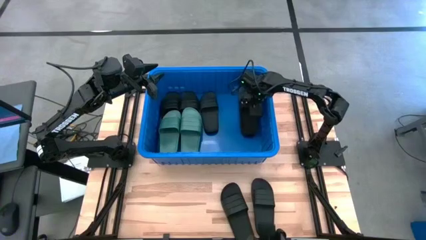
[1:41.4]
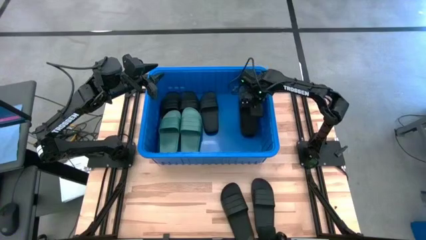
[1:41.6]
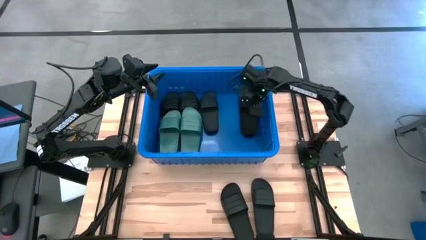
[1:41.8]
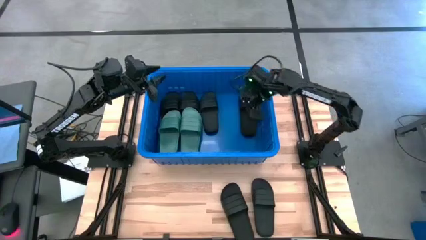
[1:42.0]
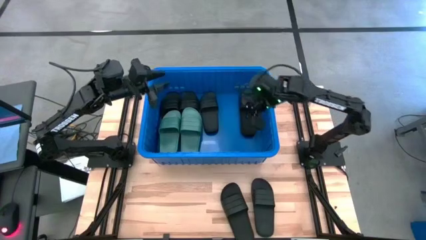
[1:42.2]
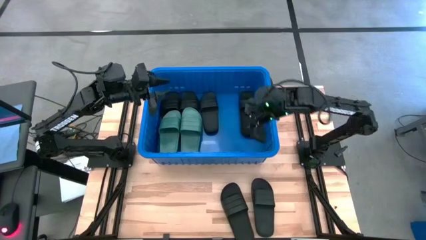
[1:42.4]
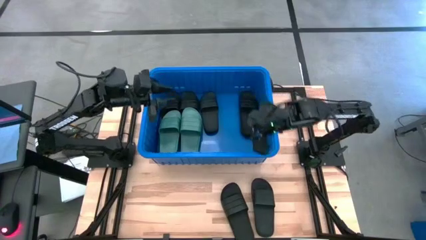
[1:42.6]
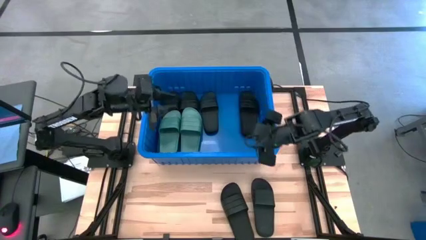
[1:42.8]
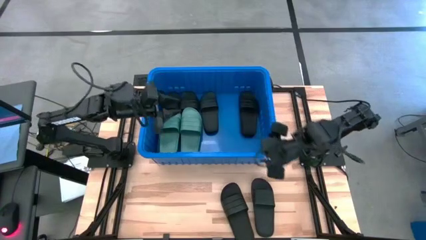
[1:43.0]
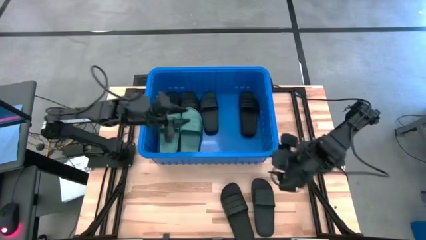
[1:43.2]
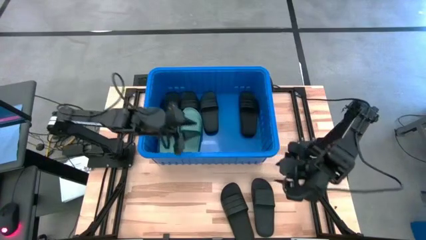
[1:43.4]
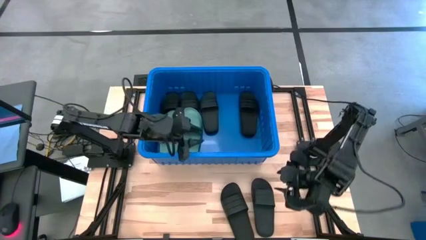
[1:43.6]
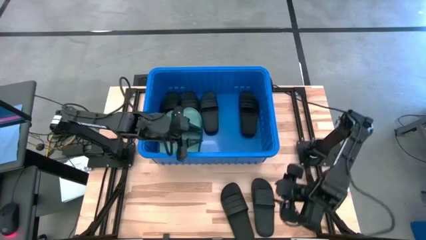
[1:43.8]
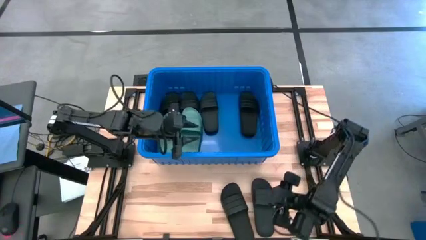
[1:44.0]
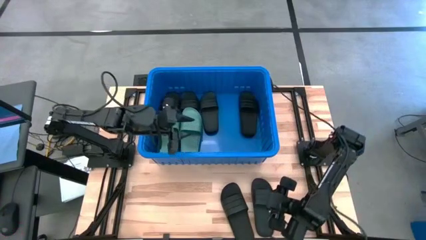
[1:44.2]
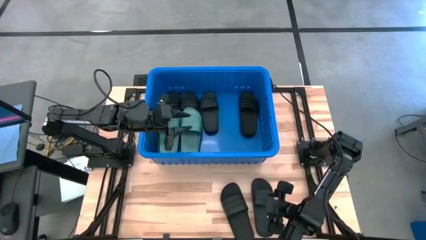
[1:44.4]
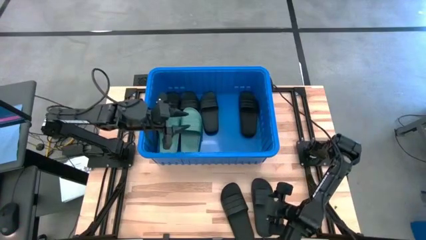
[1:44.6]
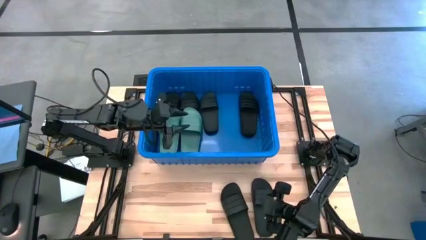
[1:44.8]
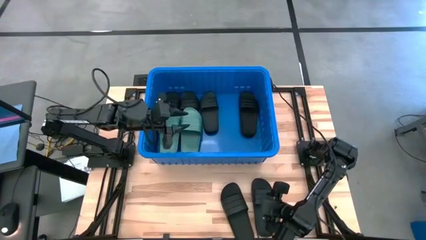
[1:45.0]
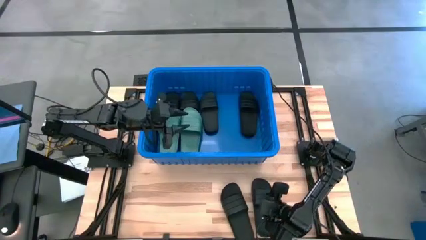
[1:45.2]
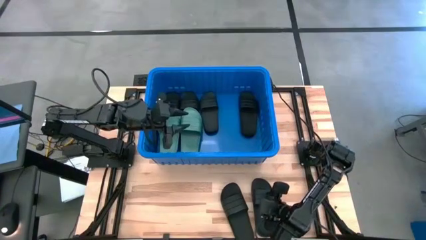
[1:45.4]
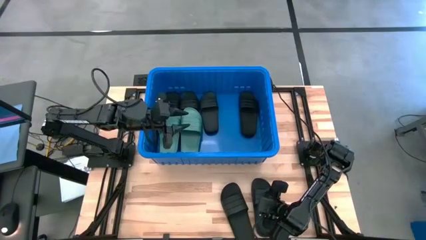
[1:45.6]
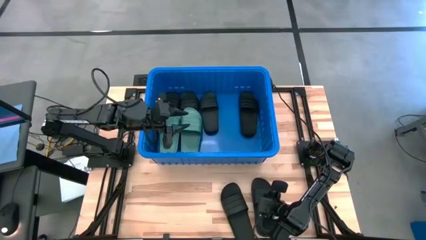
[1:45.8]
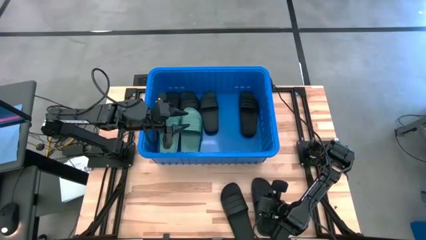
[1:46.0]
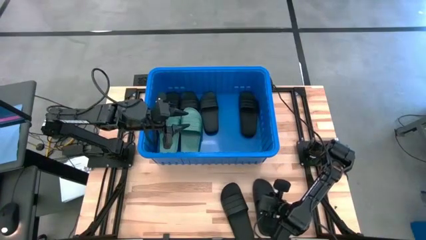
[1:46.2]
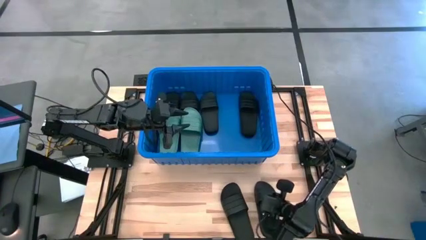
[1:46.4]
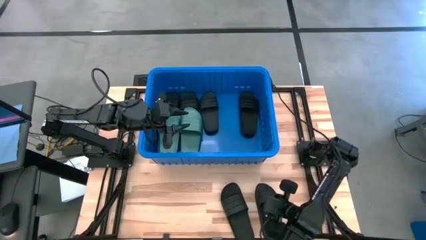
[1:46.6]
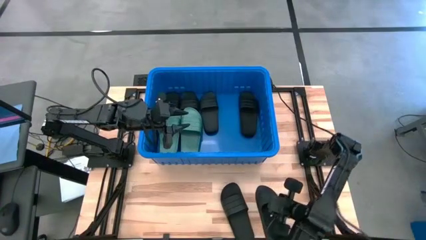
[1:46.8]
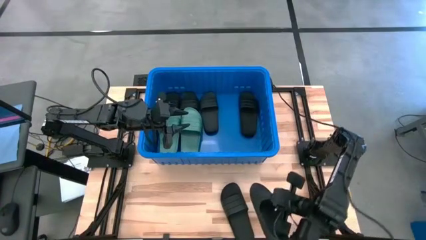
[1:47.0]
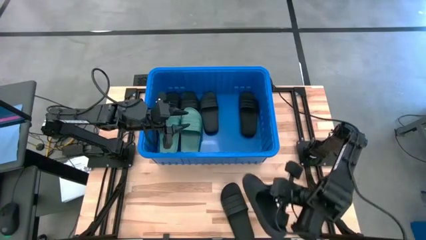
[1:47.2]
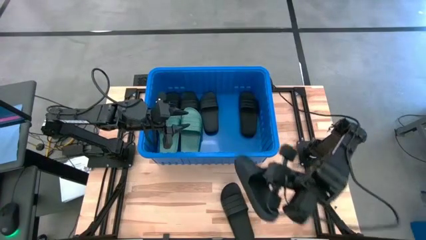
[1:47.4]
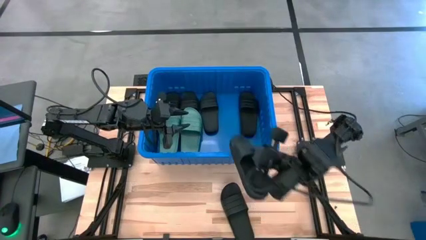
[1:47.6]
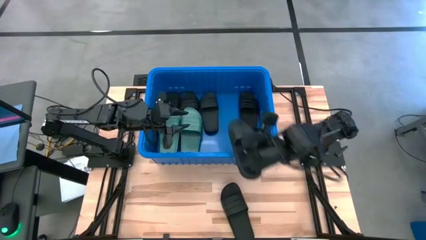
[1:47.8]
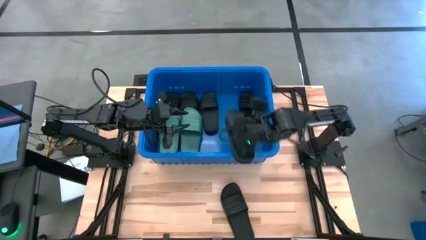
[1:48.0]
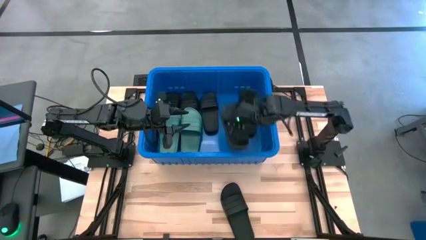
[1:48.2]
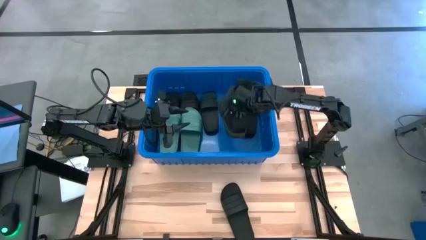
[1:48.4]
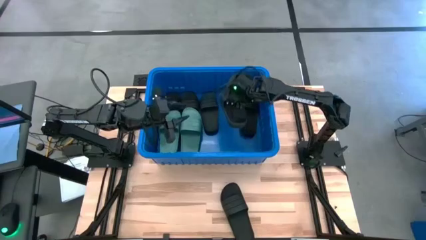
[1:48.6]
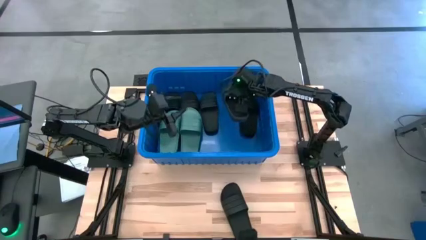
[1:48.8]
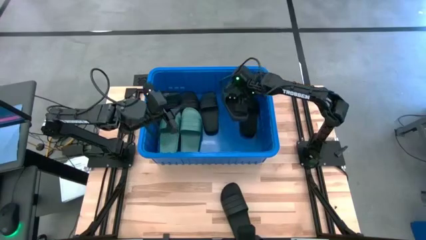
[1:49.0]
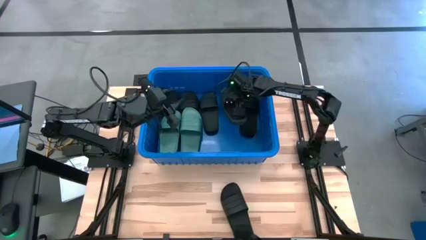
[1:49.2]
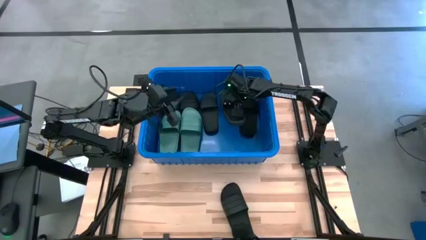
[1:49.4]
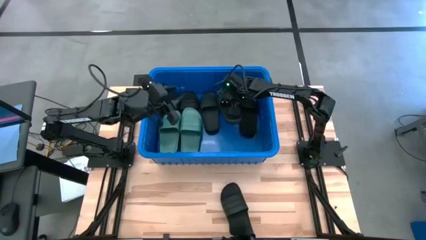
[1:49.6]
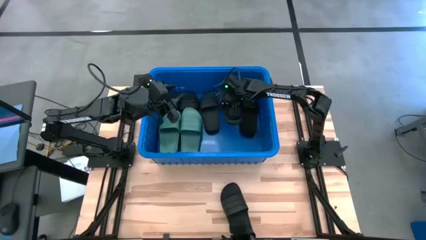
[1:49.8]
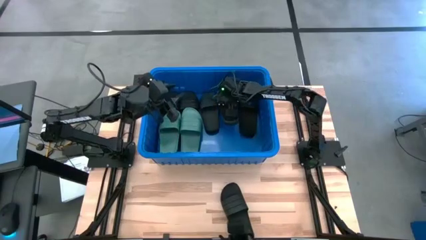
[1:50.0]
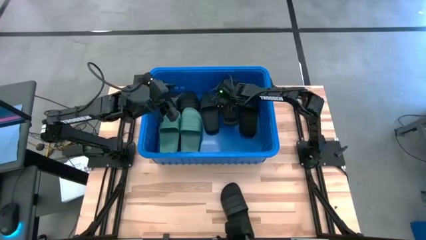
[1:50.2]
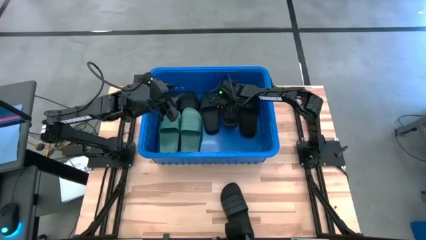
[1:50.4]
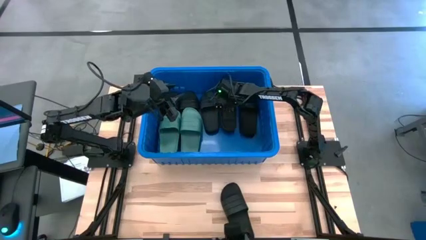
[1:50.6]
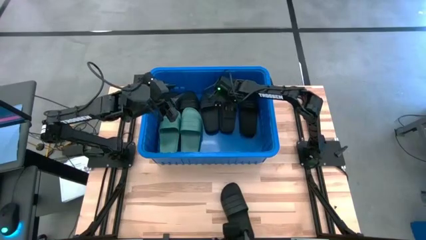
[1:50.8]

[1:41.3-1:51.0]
Task: Pick and place slides into bin
Put the black slide into the blue bin

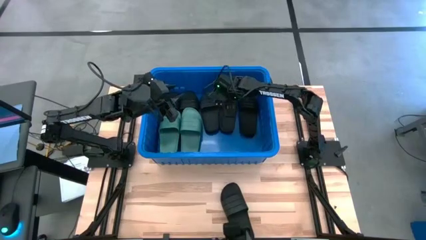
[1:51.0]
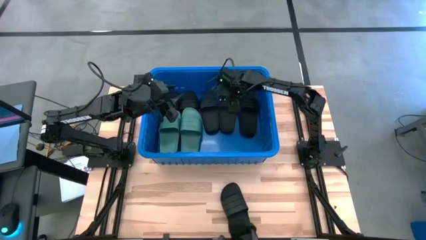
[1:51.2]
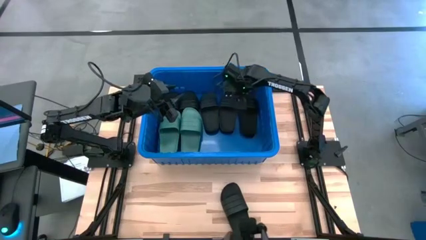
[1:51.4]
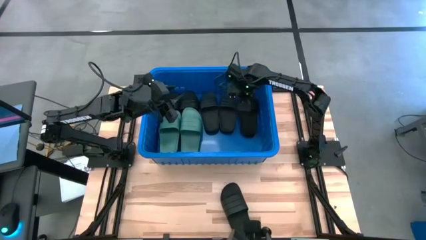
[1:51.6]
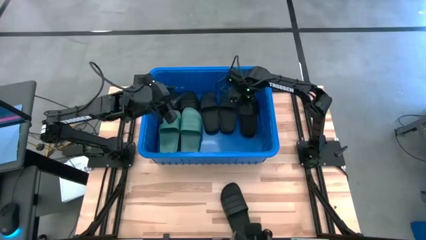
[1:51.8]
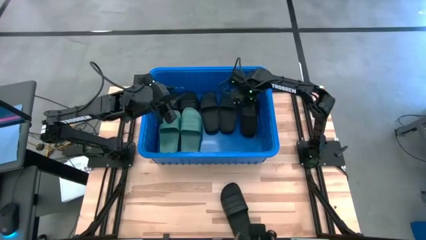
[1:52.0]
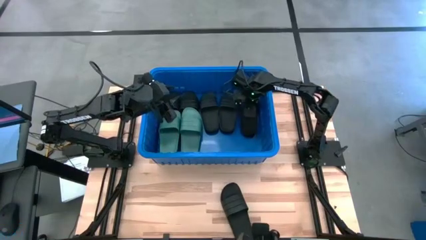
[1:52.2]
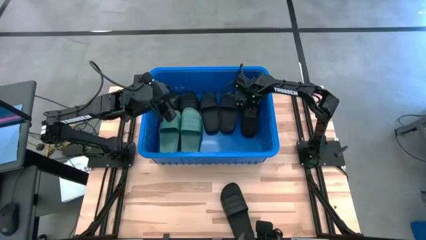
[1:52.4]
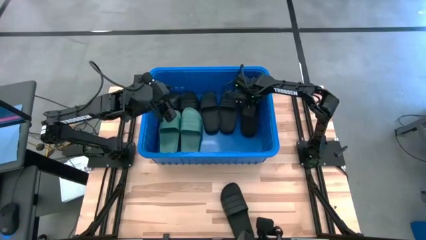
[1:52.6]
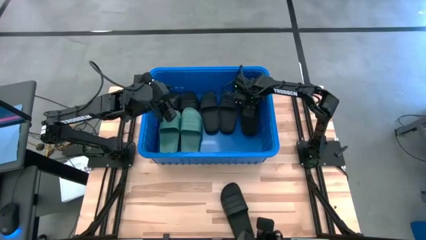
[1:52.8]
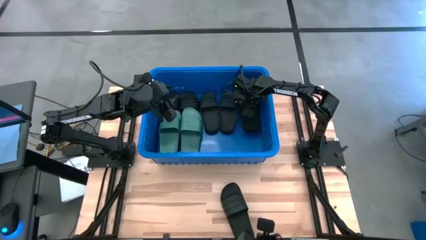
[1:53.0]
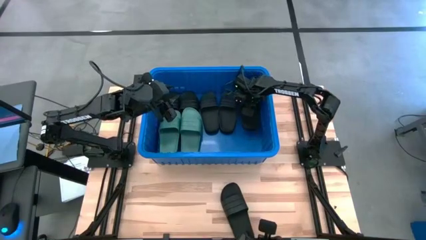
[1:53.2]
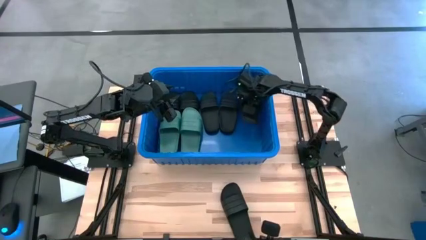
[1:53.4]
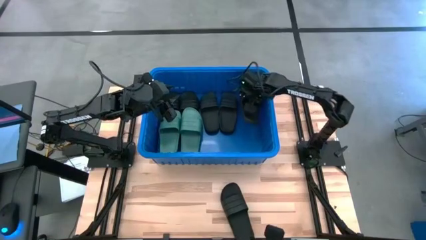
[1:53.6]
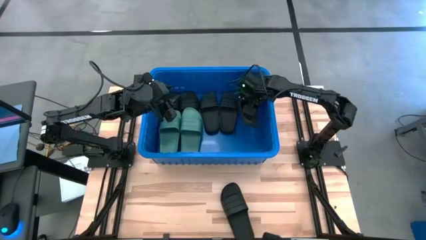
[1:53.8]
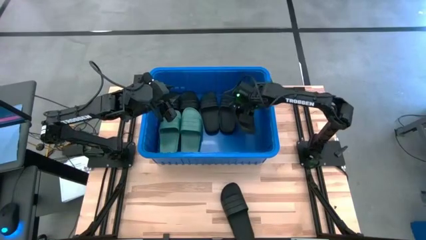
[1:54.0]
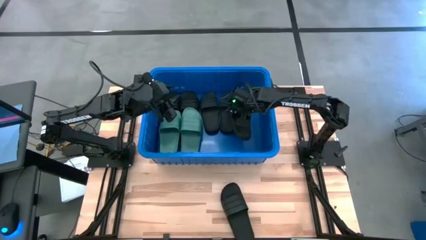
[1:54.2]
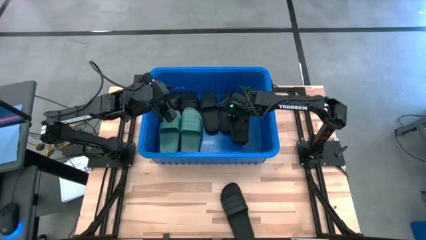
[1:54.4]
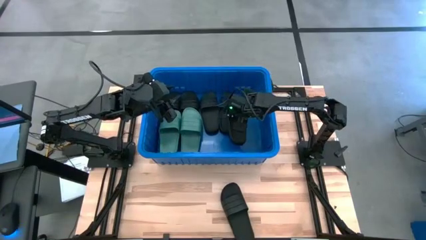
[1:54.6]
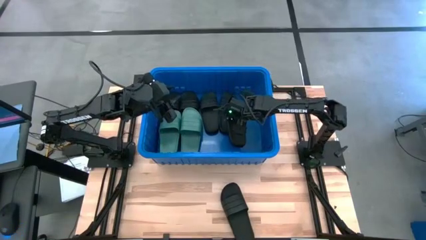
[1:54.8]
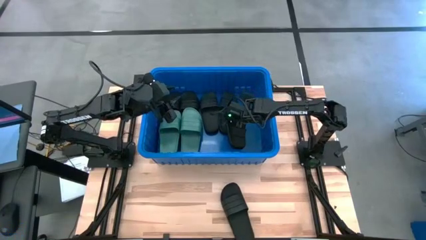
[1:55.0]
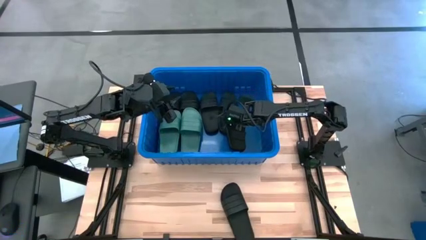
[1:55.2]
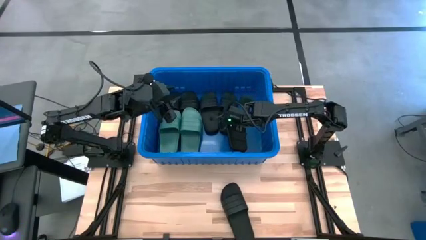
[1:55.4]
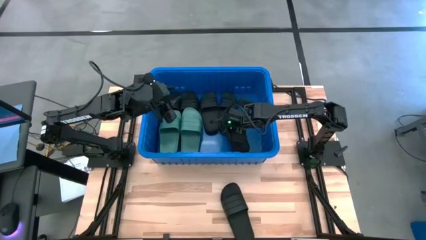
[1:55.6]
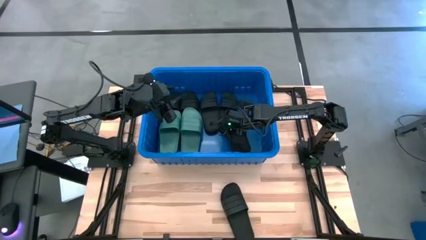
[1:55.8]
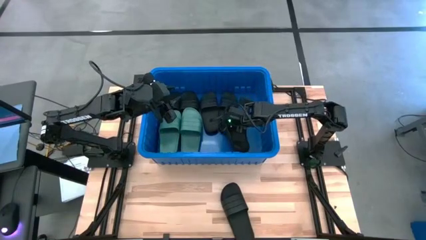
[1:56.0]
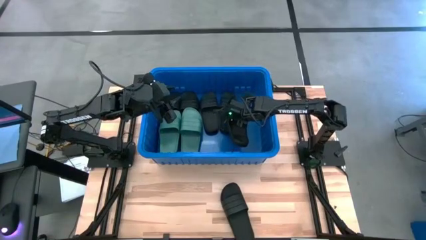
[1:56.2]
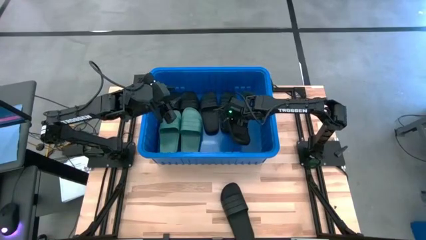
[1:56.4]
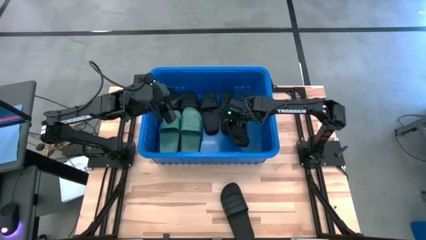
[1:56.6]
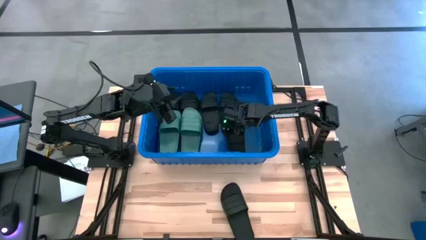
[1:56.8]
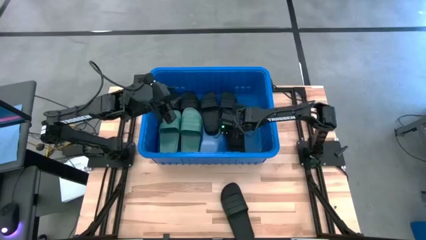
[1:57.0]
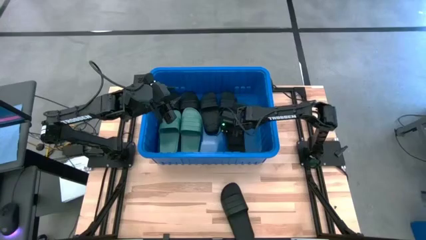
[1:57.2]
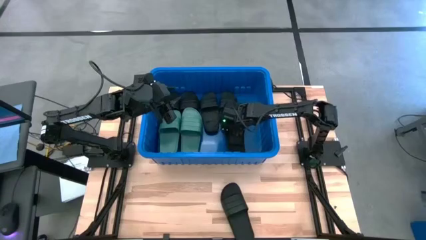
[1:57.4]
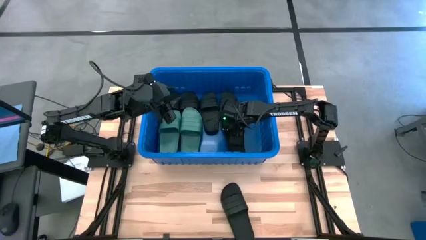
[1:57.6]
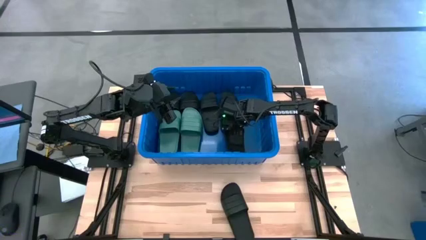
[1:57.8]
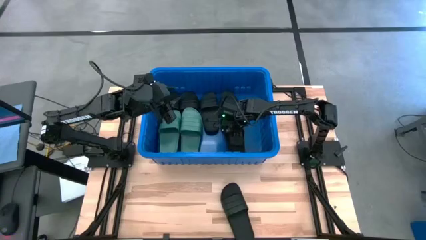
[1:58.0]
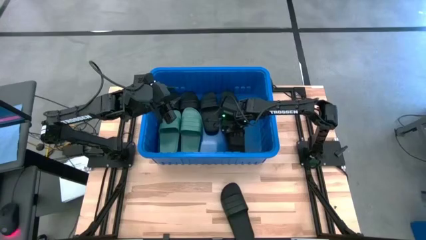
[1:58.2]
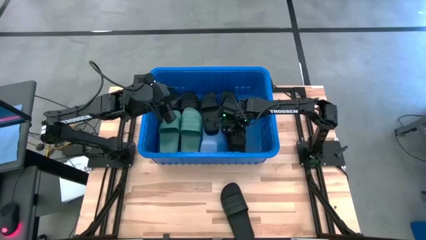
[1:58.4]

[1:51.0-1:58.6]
Adjust the black slide in the blue bin
